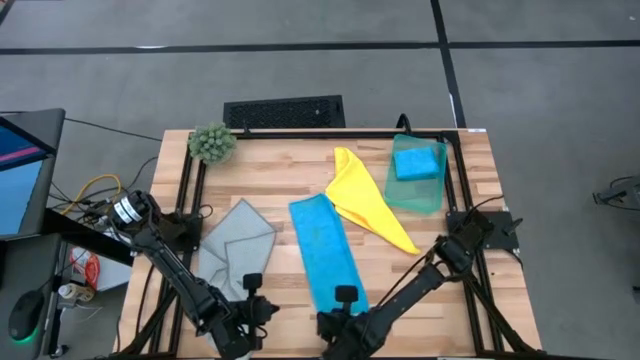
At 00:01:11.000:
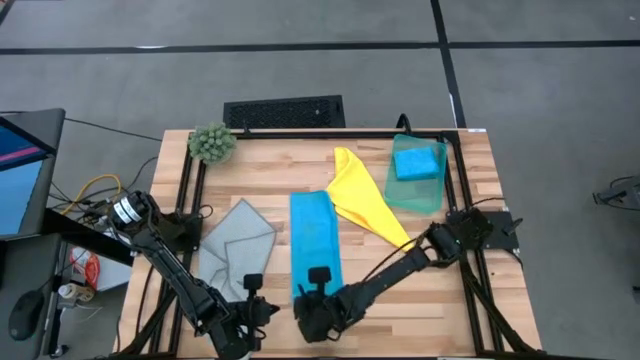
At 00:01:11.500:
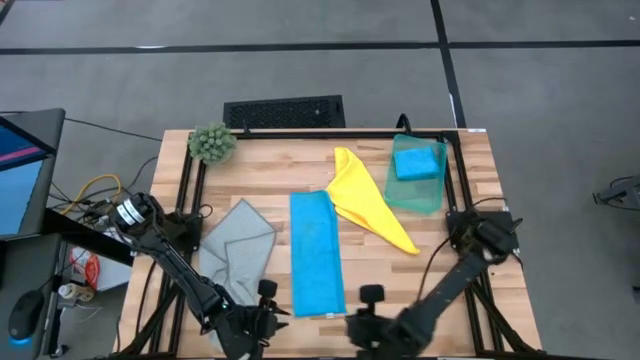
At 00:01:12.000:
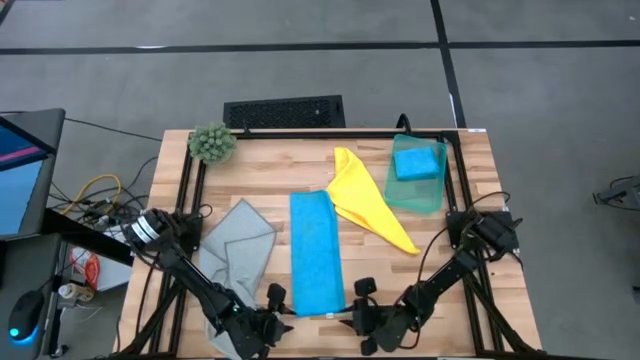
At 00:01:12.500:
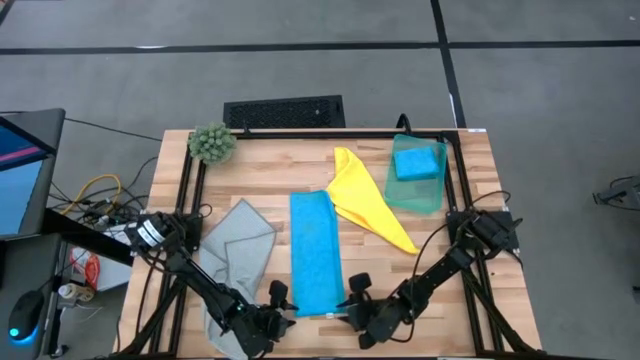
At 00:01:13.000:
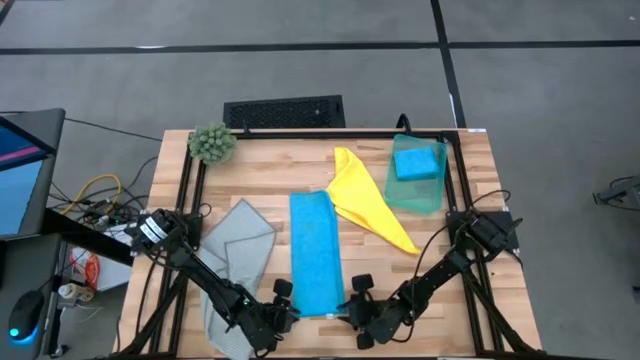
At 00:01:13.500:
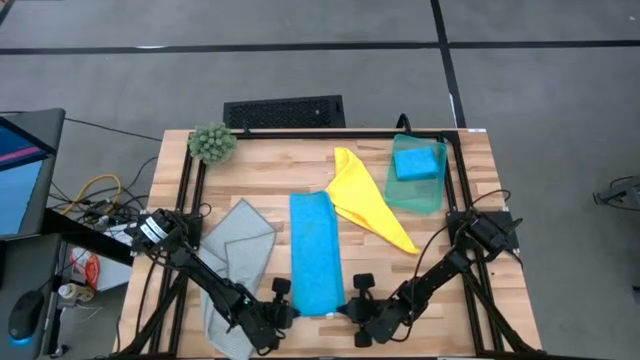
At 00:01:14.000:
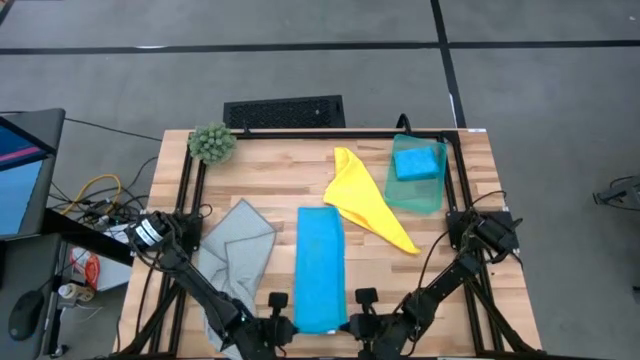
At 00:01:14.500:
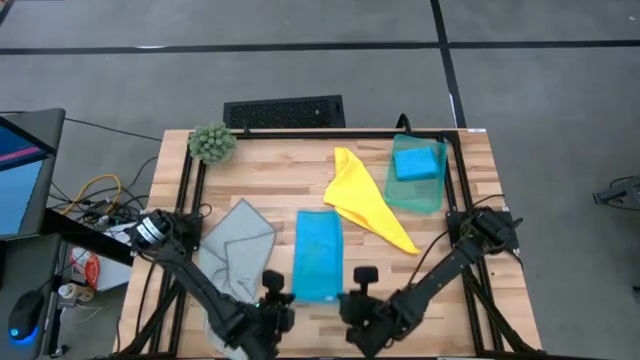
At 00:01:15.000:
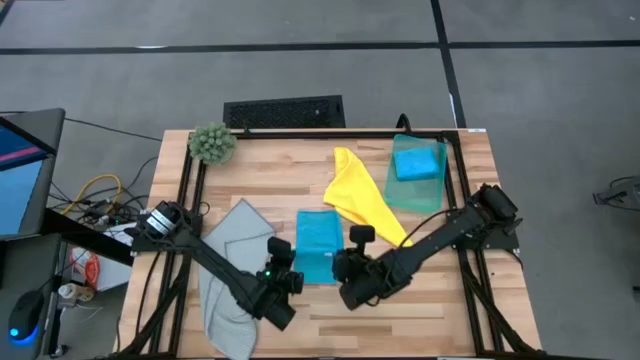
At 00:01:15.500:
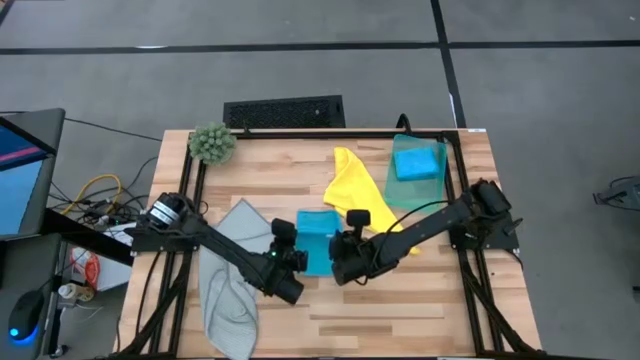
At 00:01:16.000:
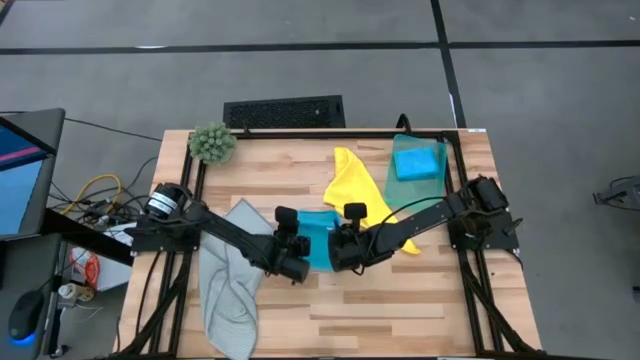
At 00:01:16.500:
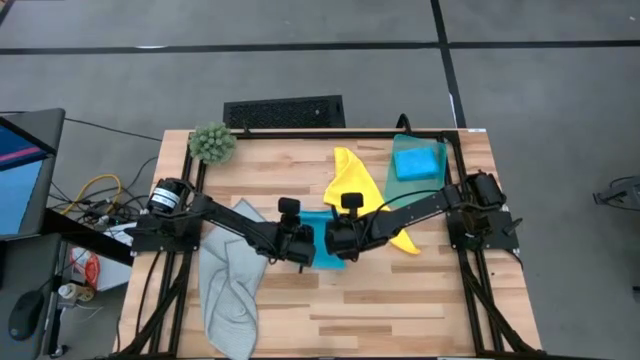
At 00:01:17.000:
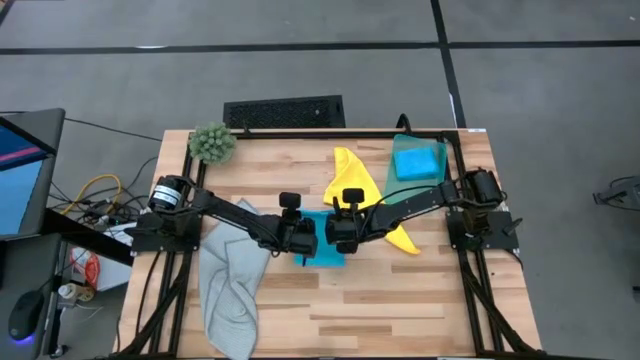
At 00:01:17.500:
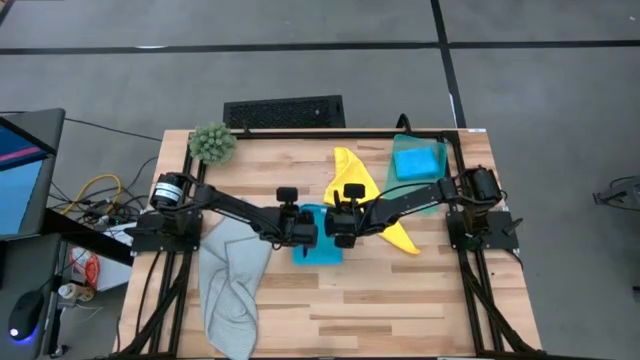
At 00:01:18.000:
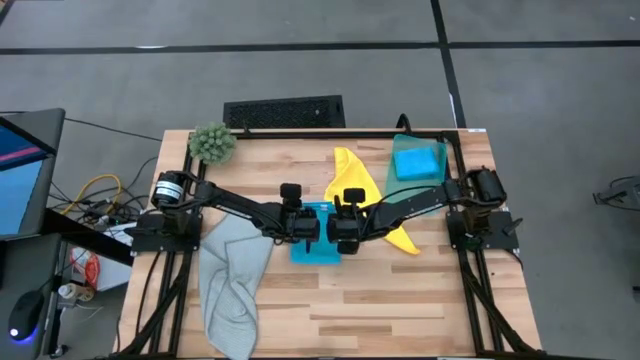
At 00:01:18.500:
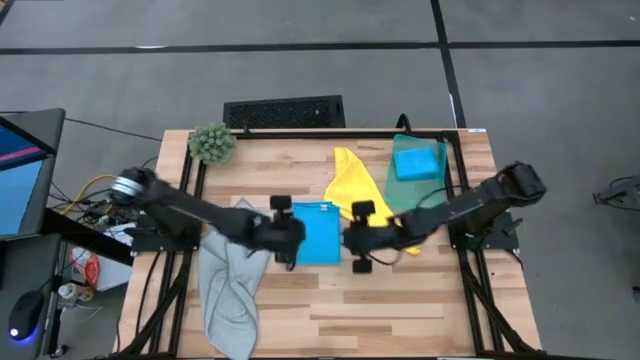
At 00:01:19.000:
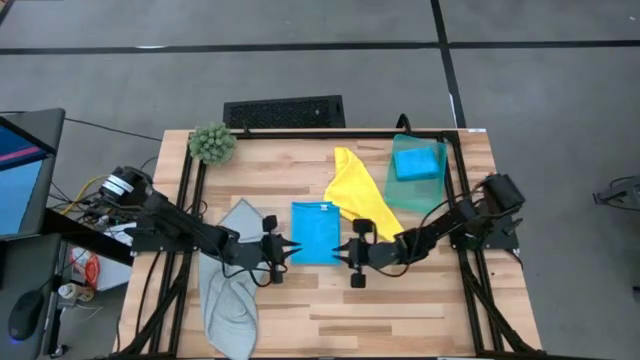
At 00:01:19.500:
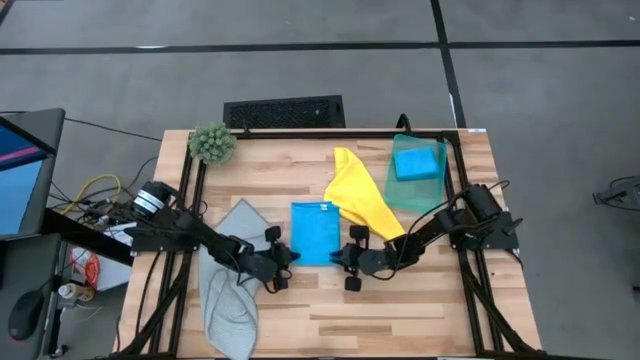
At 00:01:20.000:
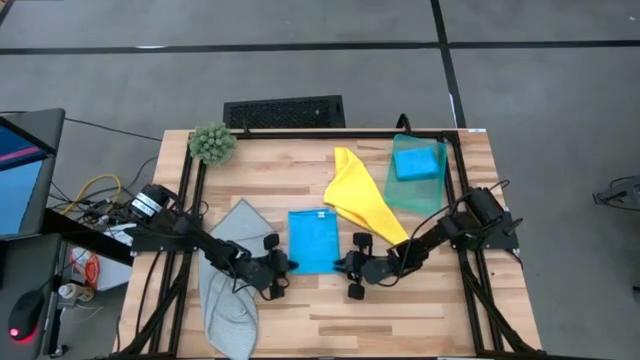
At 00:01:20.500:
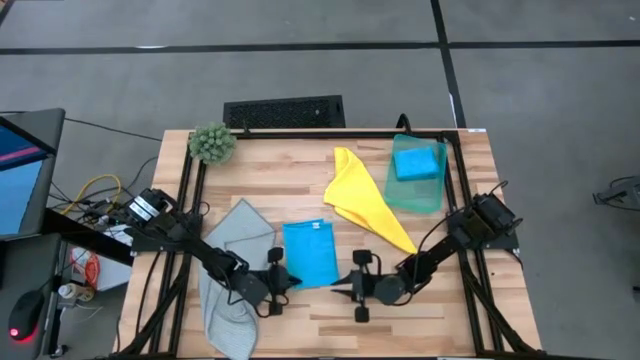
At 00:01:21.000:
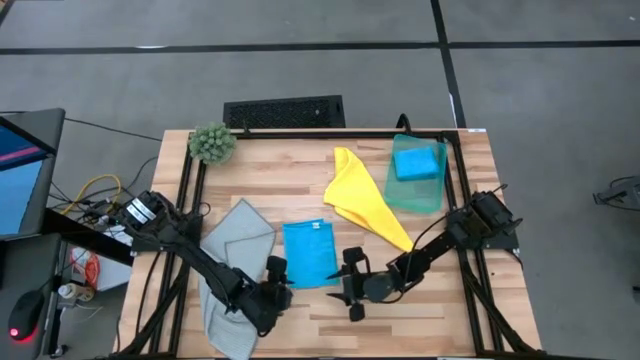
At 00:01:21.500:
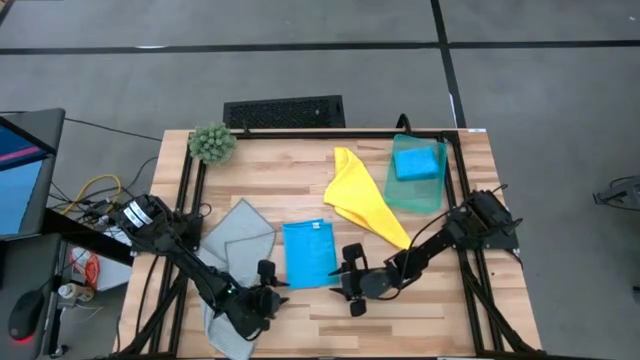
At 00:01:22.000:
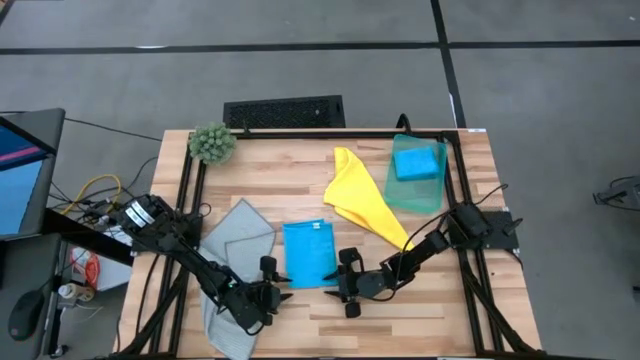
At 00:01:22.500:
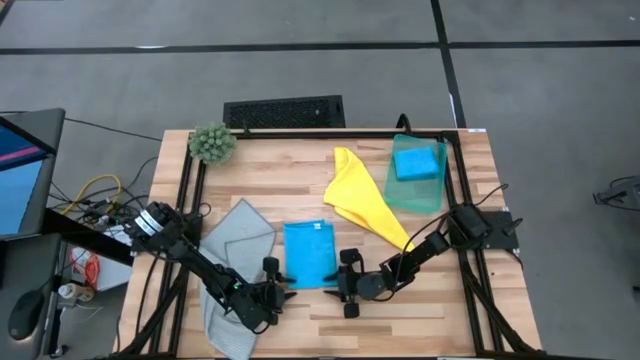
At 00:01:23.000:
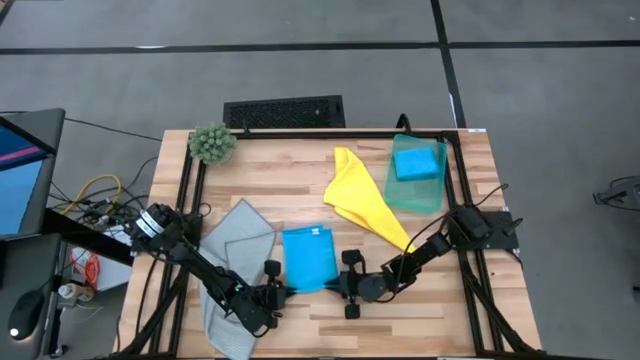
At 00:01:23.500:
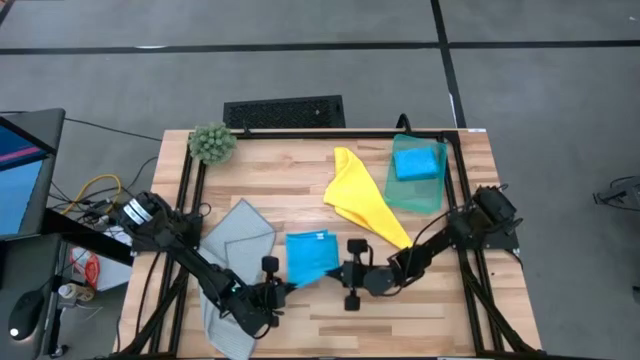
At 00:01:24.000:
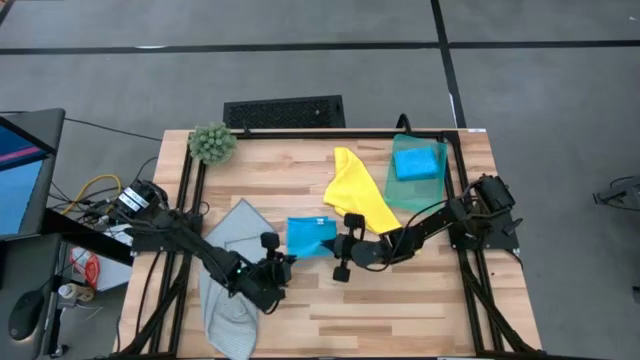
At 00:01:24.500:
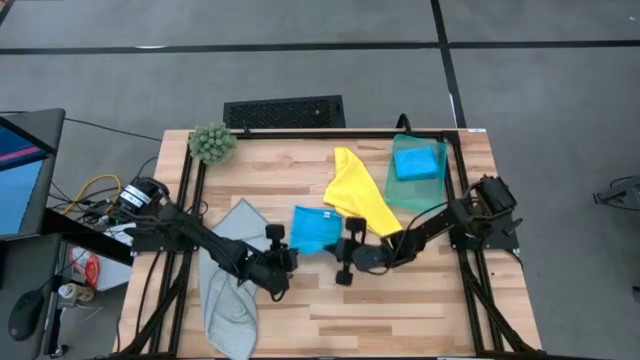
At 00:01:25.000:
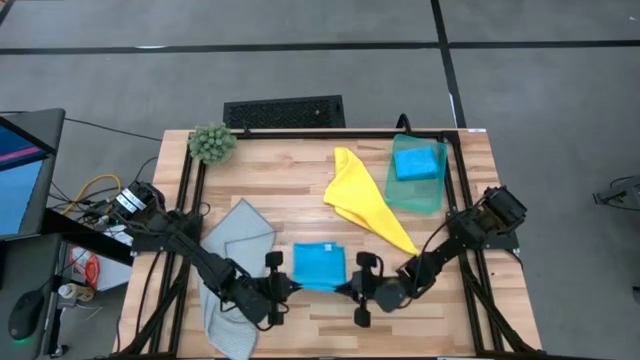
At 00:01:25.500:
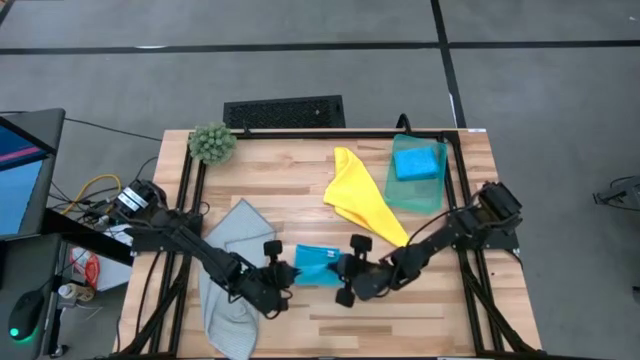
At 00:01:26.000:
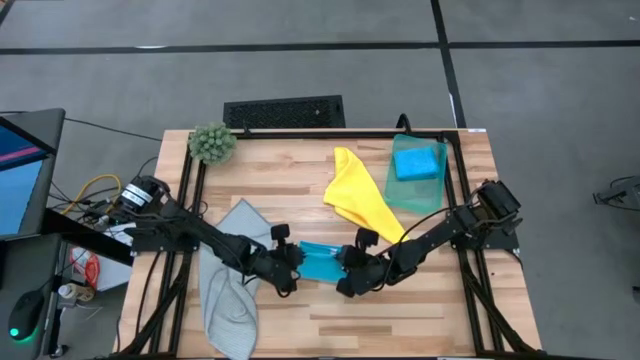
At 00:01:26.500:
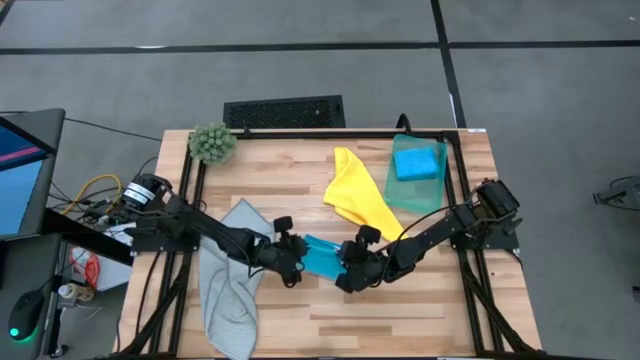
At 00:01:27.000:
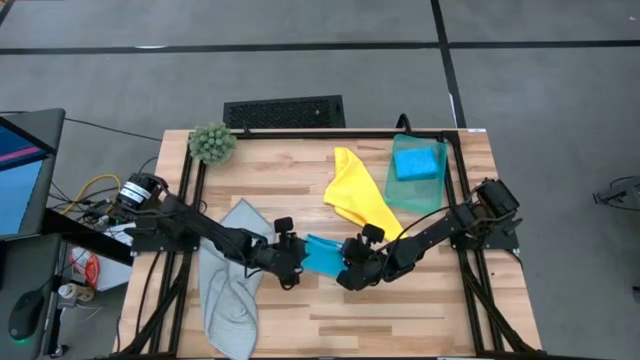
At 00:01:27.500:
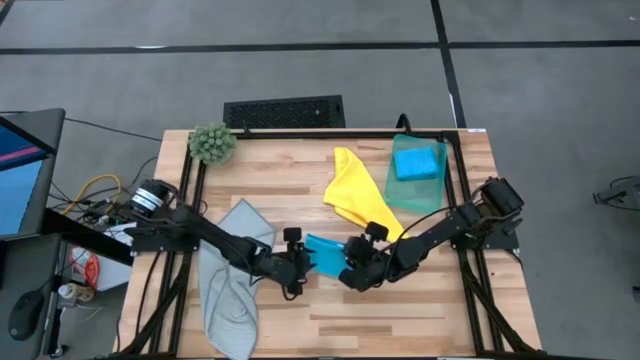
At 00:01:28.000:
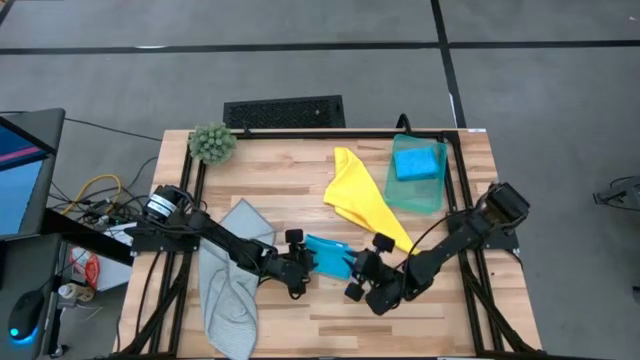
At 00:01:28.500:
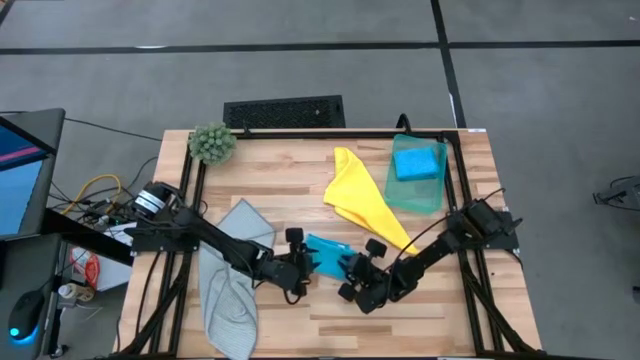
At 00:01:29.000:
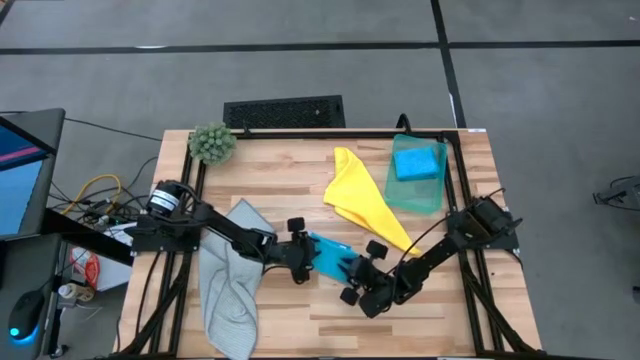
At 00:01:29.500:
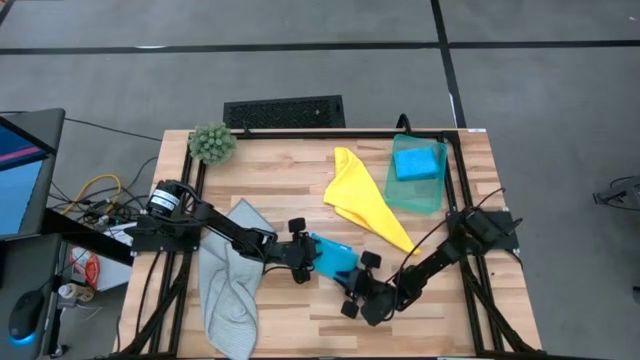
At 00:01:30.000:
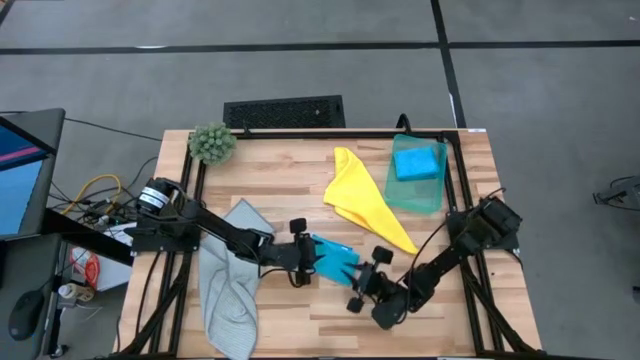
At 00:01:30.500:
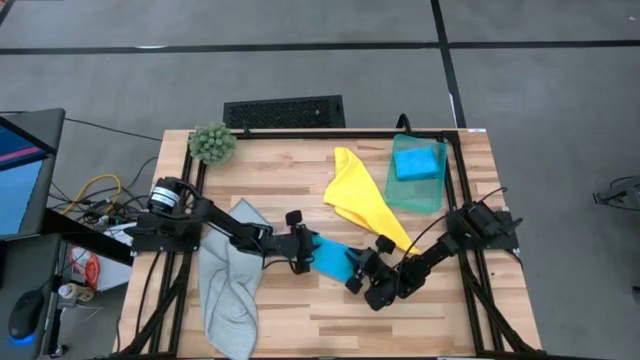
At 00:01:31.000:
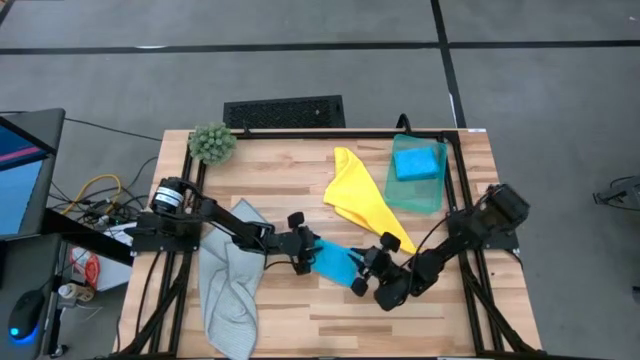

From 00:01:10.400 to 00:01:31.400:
Task: Fold microfiber towels
Fold the blue microfiber cloth

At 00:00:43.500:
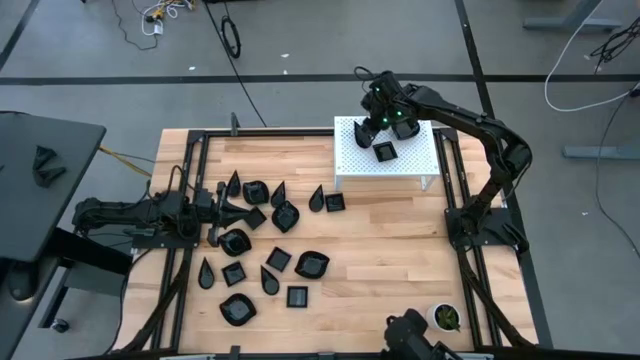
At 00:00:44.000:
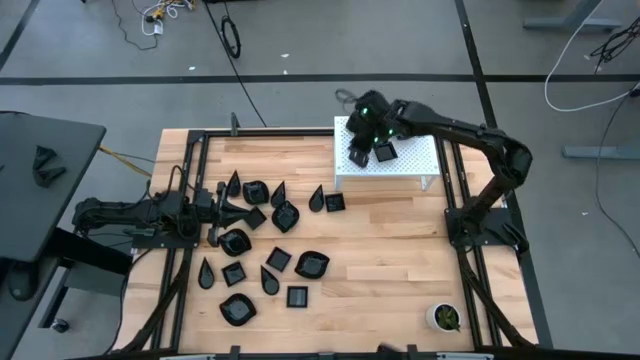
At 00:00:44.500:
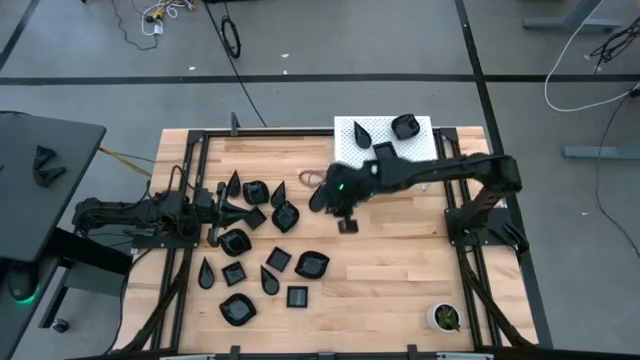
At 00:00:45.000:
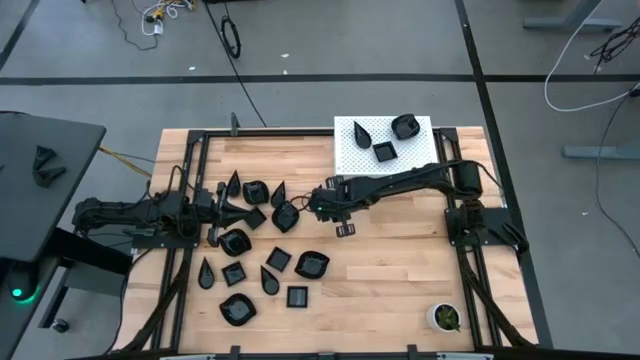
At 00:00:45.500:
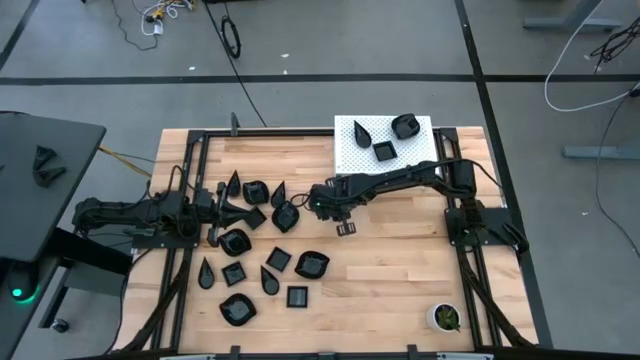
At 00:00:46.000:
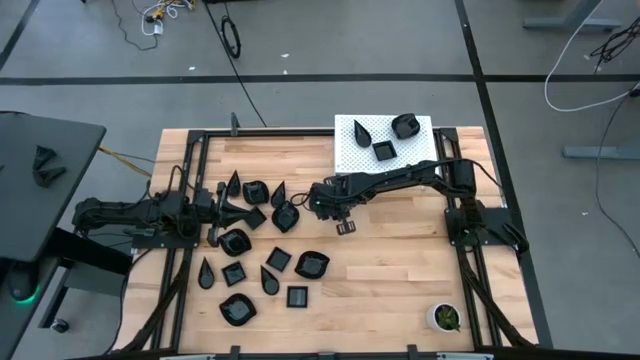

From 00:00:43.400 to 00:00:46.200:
Task: Pick & Place Mini shaped plates
Stack the black square plate on the black square plate on the shelf
